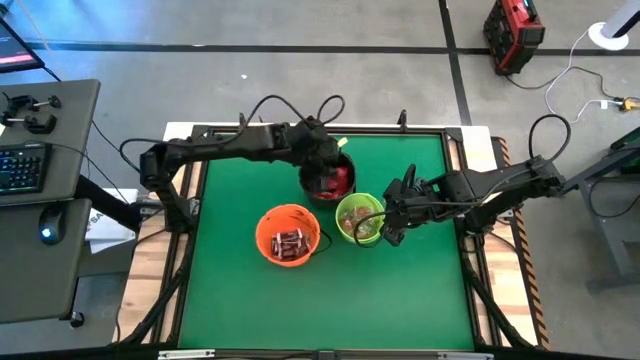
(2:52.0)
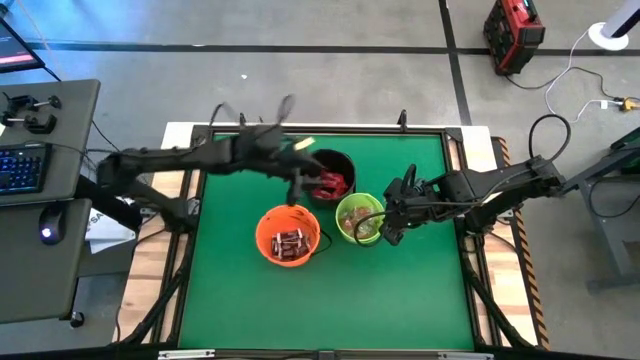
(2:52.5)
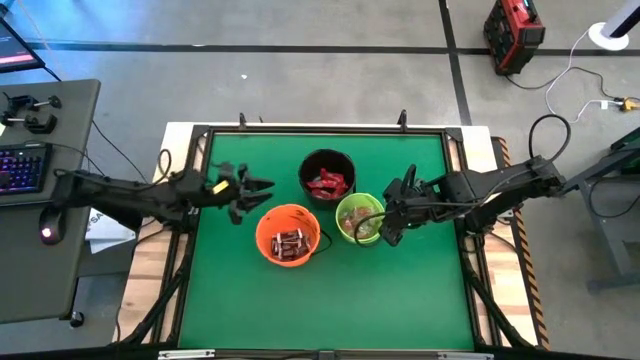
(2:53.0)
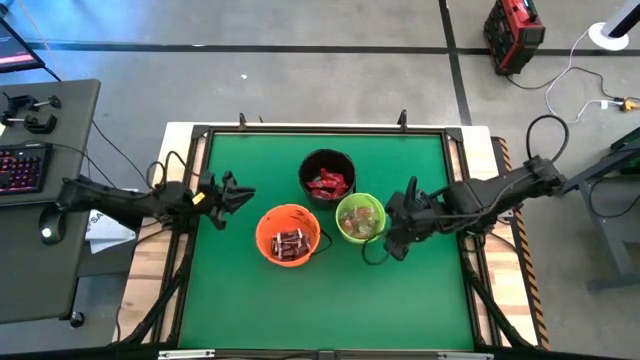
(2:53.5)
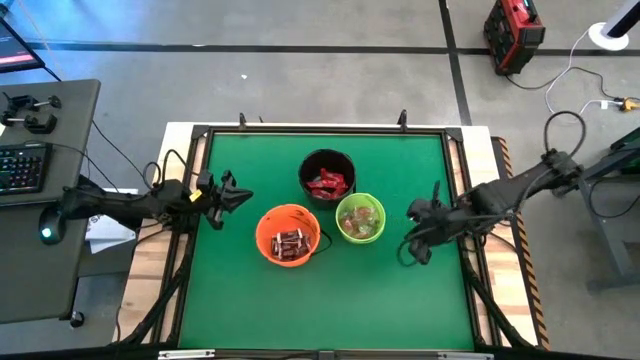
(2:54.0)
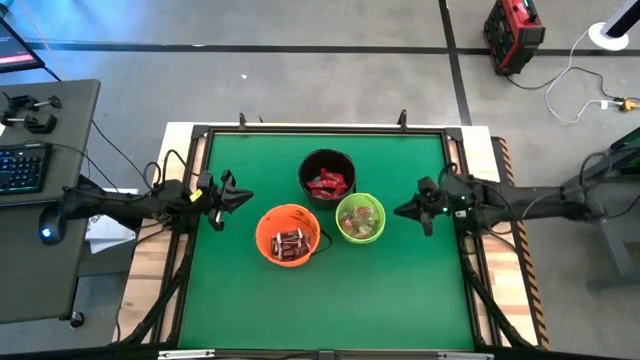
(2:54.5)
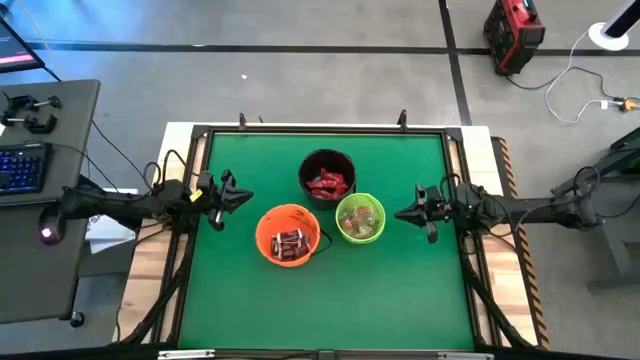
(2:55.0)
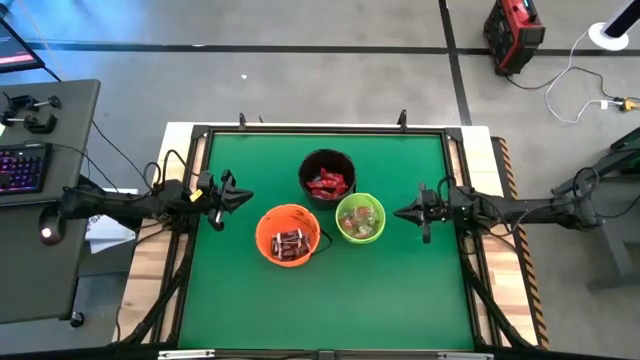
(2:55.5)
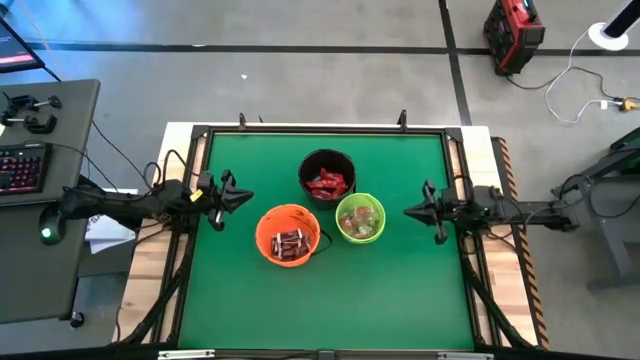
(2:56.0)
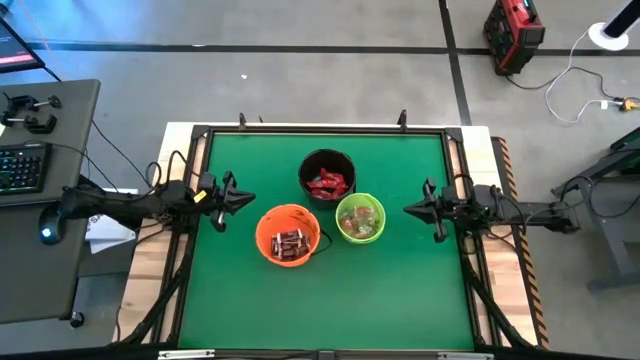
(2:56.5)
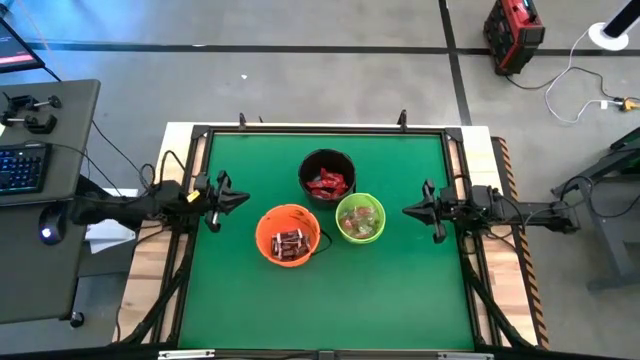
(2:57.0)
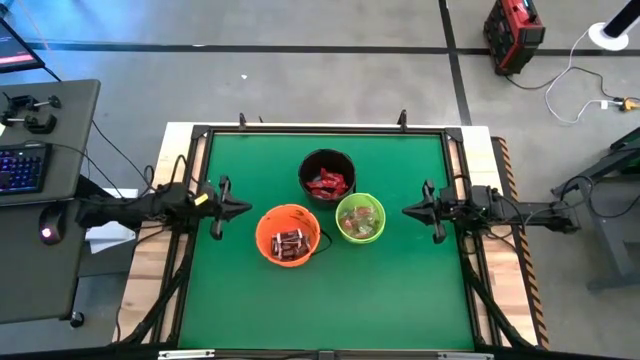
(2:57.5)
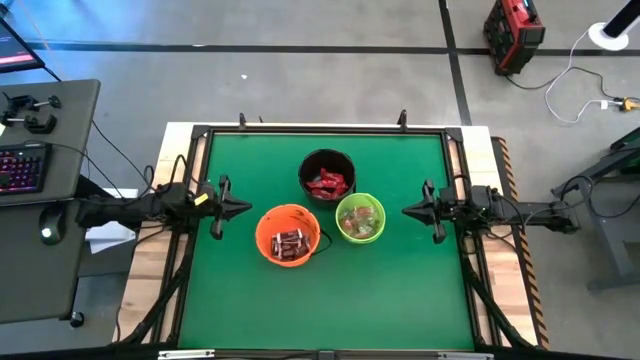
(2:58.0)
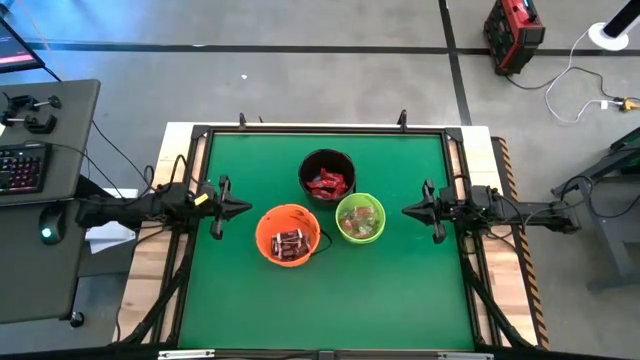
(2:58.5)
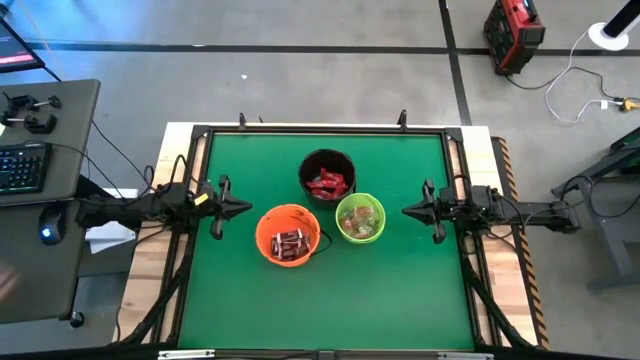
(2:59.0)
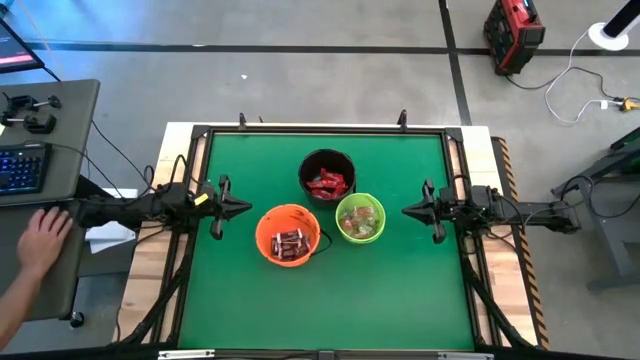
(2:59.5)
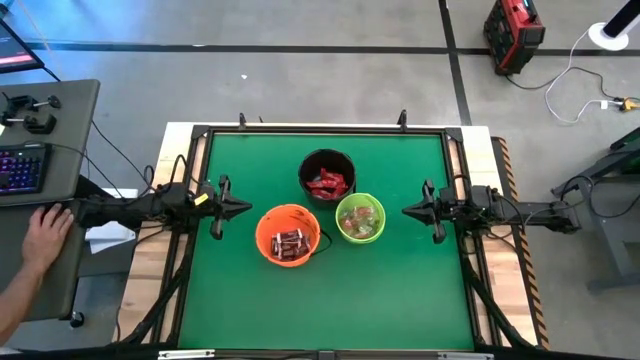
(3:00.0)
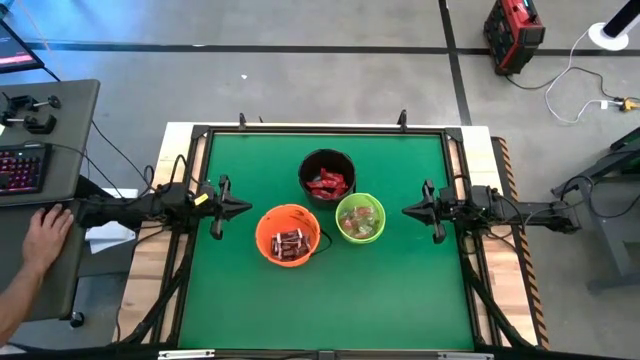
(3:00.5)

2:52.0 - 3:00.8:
Task: Sort candy by brand, put in halloween buckets
Return to Home Position

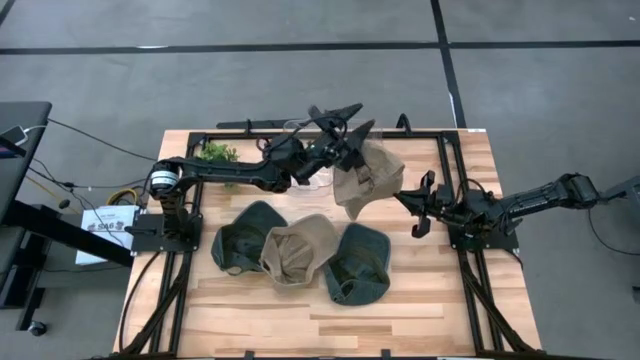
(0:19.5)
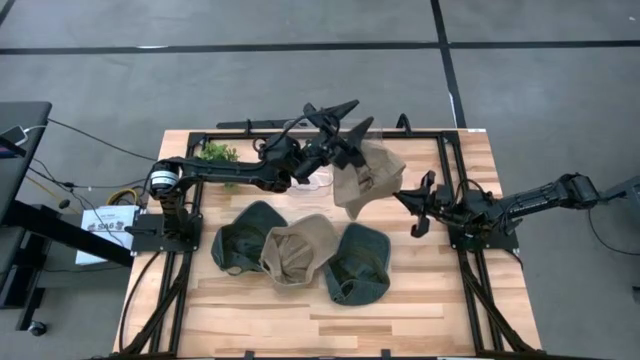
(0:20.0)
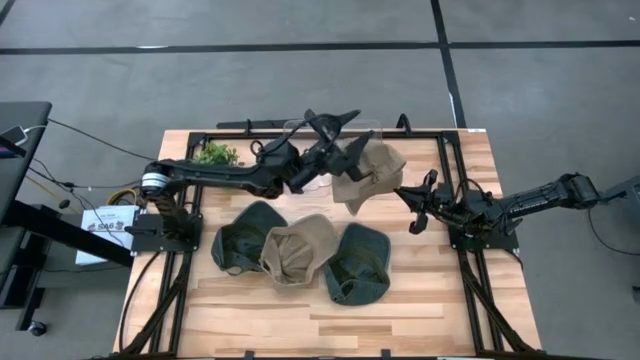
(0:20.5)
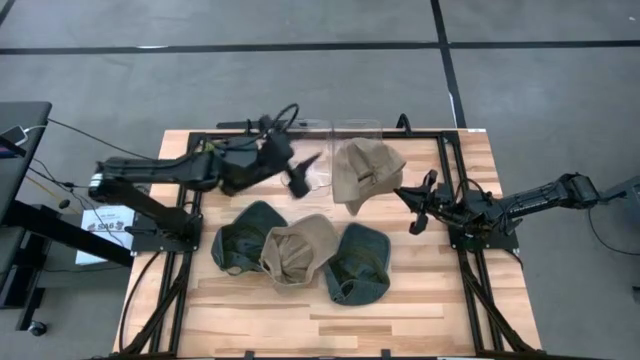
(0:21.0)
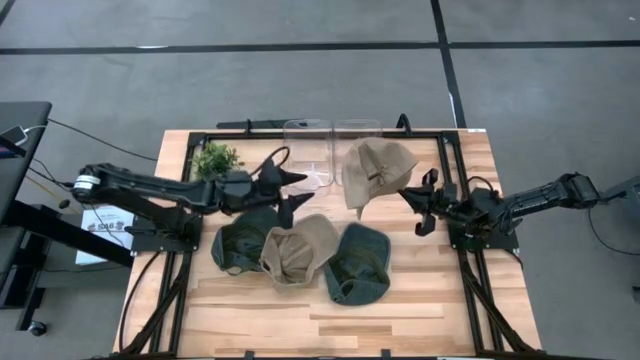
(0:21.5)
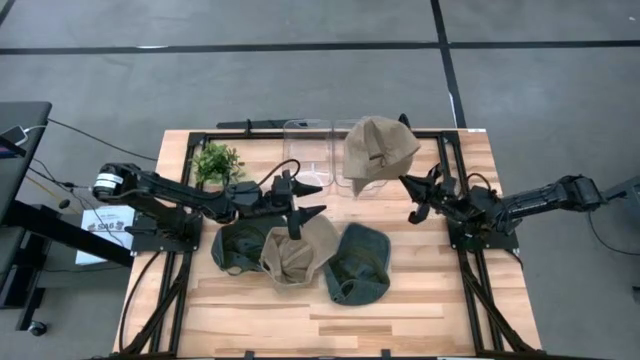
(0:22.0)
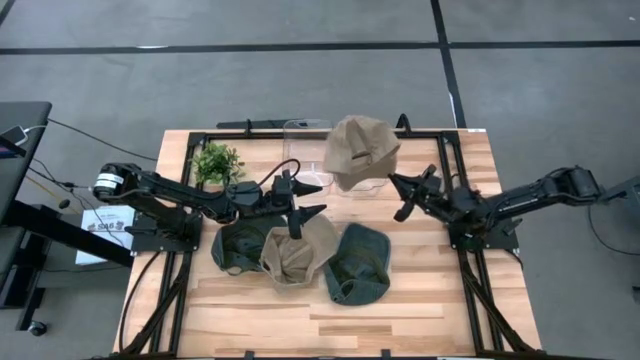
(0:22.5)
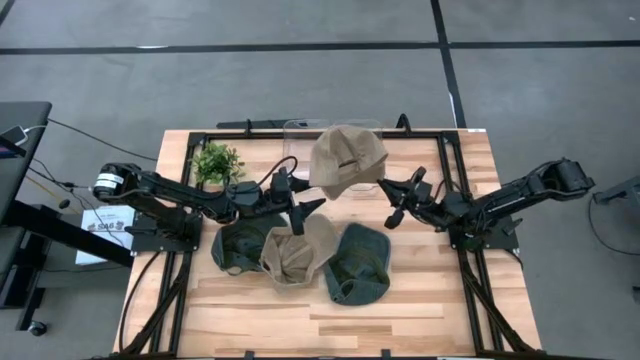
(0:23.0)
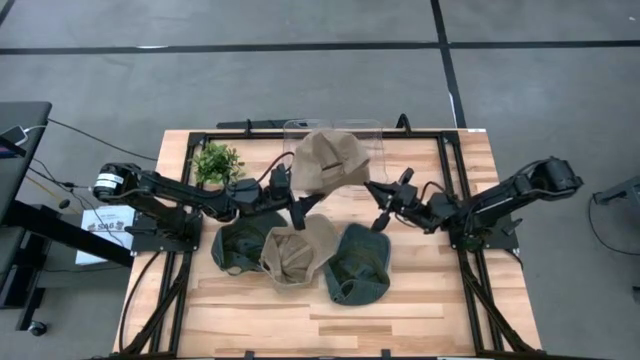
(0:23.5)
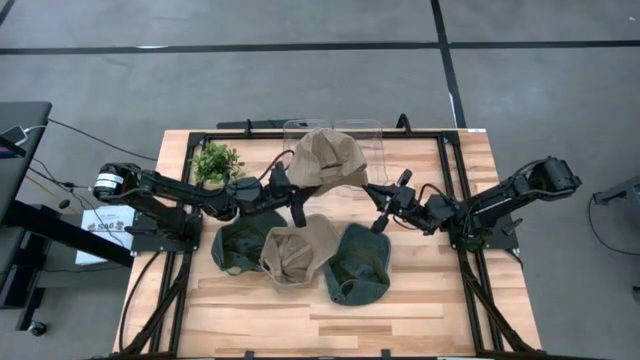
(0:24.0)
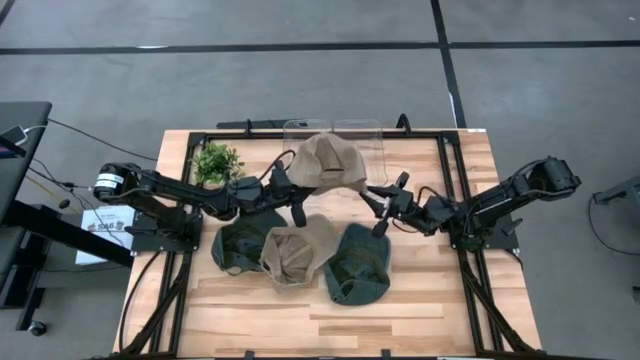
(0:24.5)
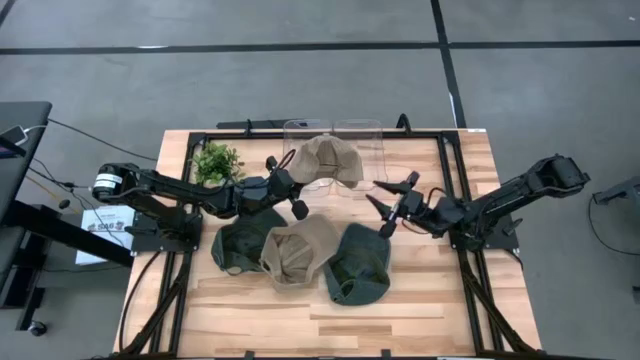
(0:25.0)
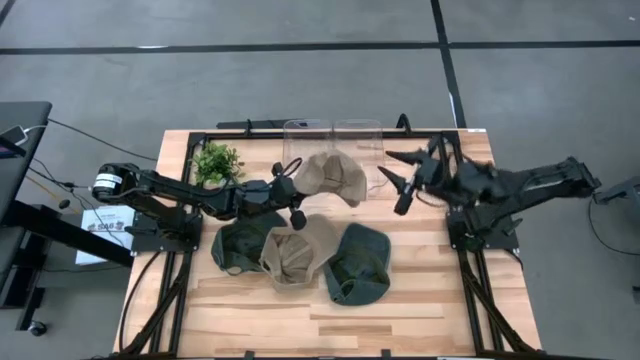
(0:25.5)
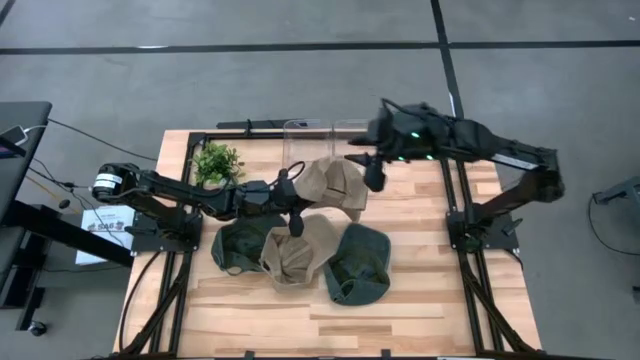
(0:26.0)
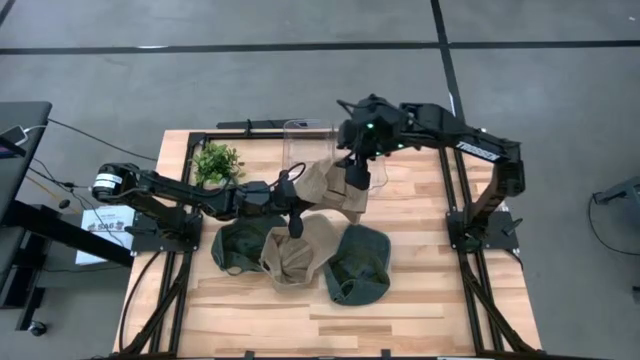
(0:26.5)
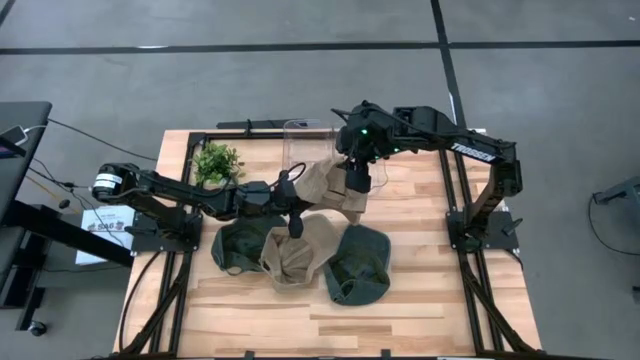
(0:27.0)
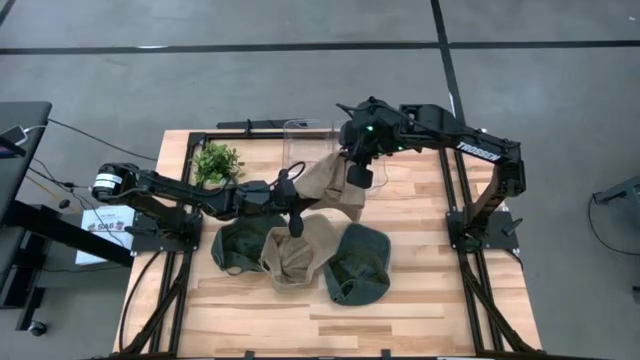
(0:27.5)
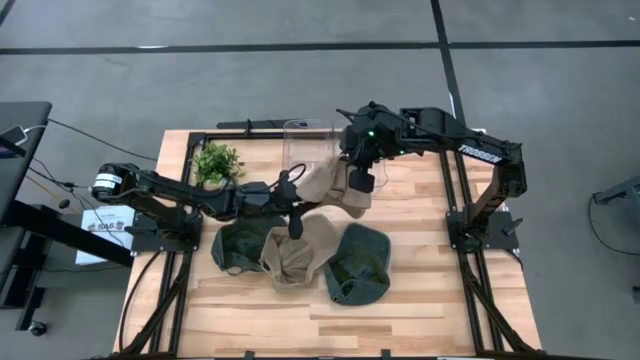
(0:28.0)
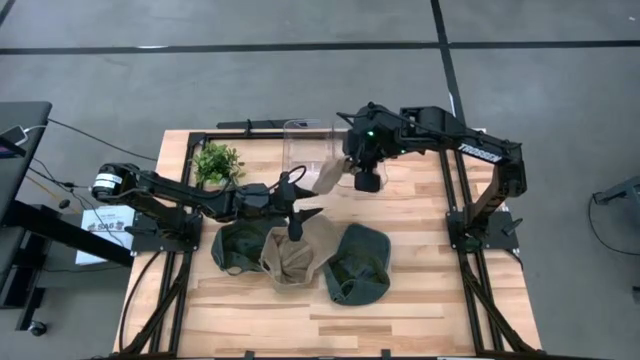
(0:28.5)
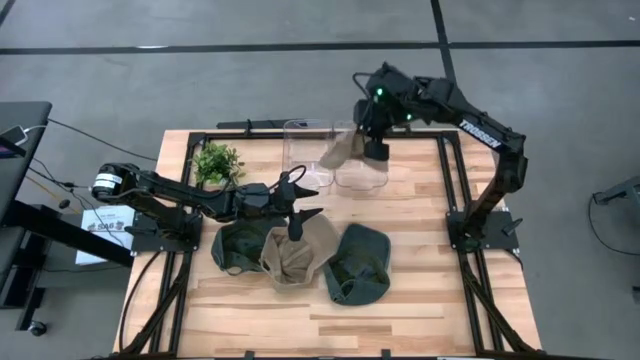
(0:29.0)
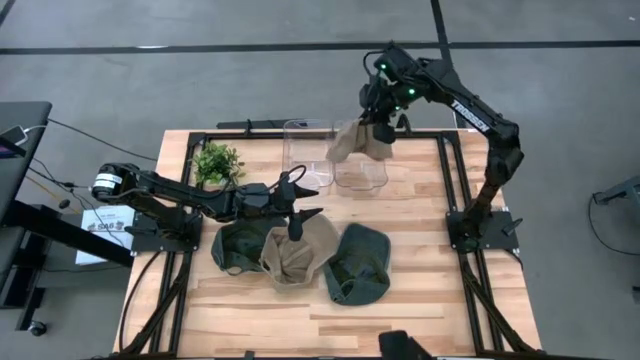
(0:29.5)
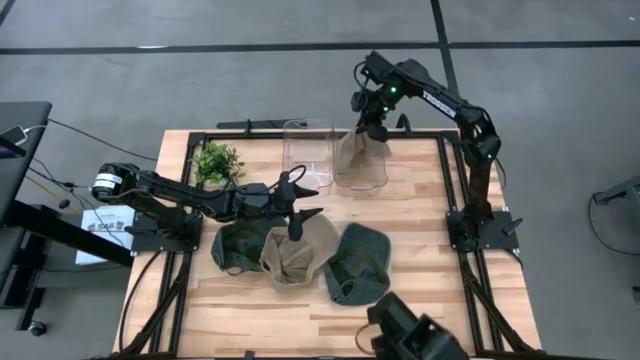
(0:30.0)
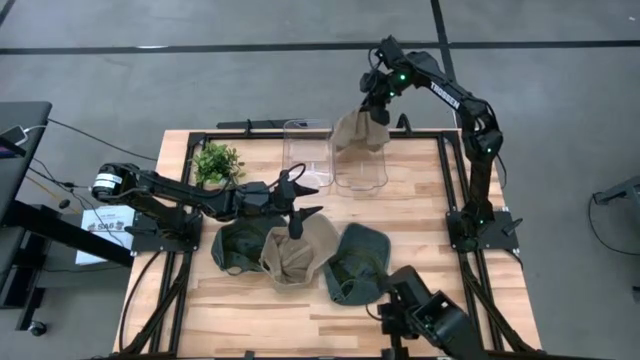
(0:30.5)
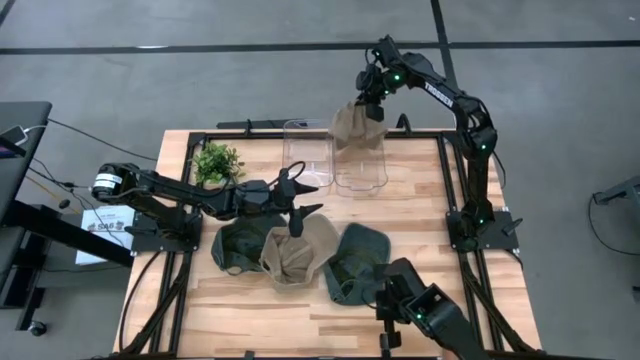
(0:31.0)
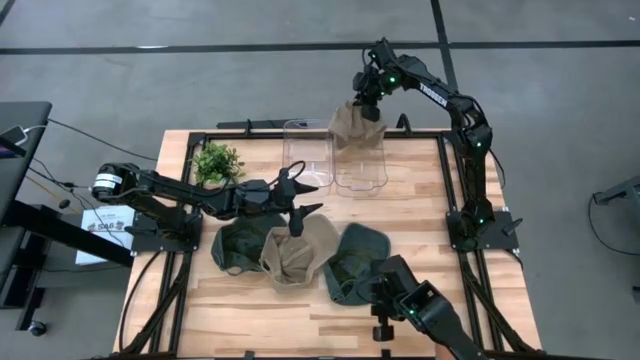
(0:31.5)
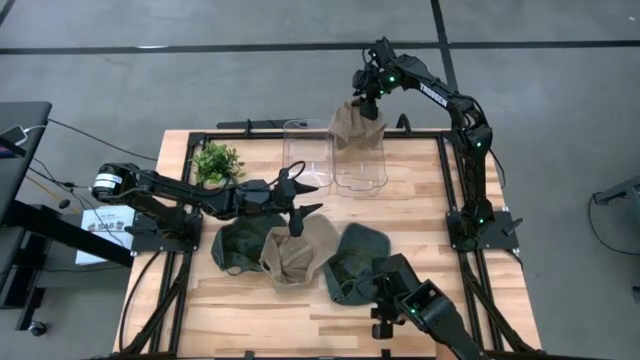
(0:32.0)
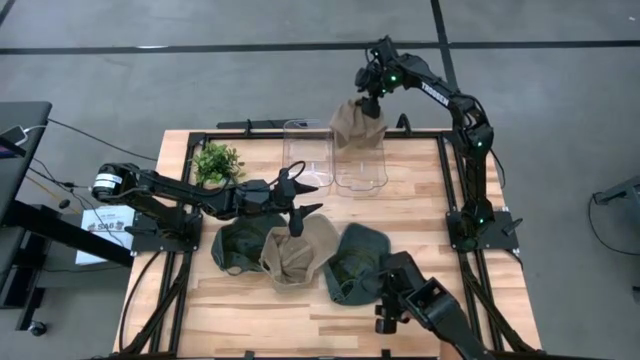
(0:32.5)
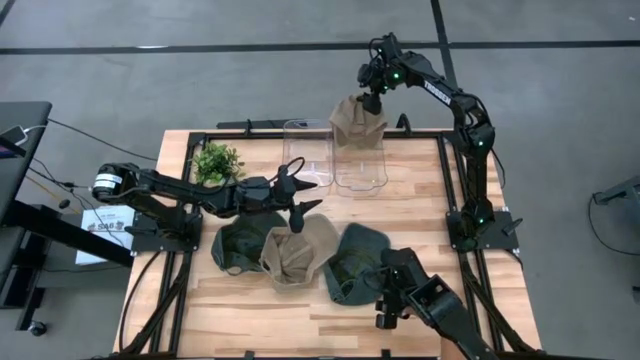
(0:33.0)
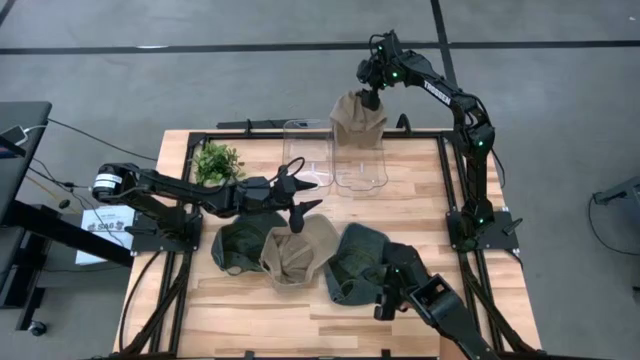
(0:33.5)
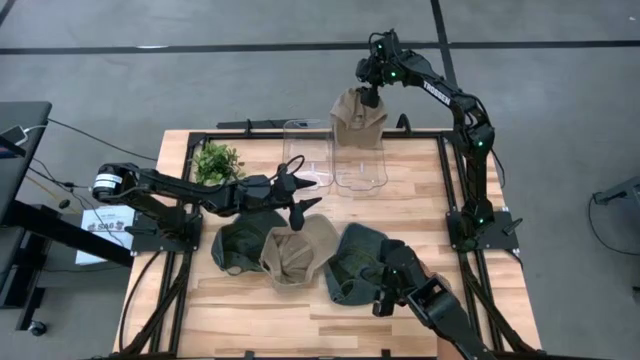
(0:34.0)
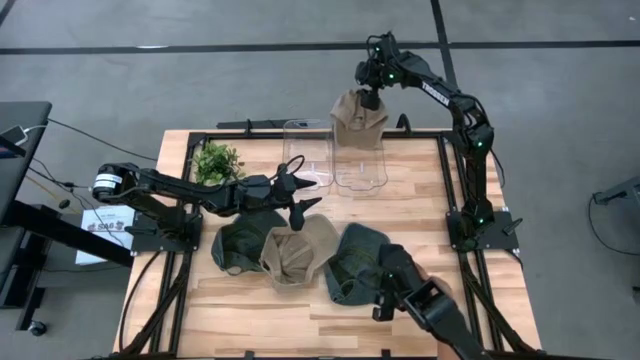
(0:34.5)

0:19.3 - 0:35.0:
Task: Pick & Place hat
Put the right brown cap into the right transparent bin
